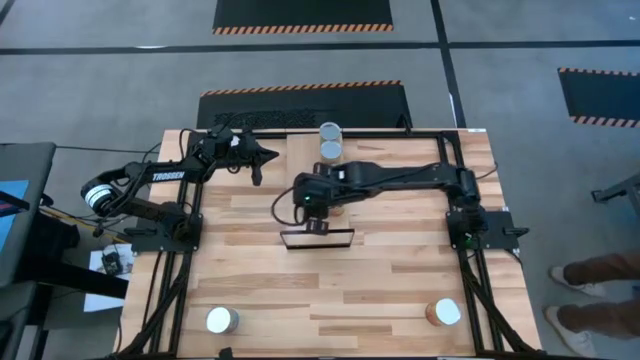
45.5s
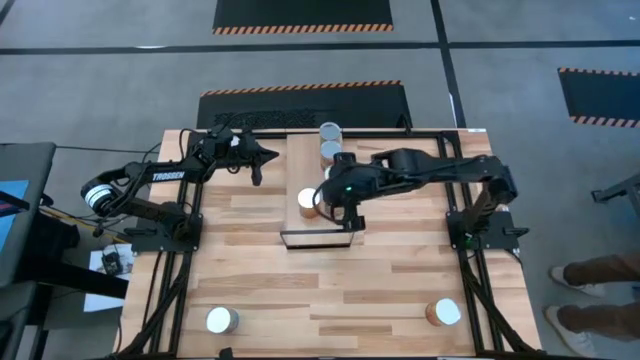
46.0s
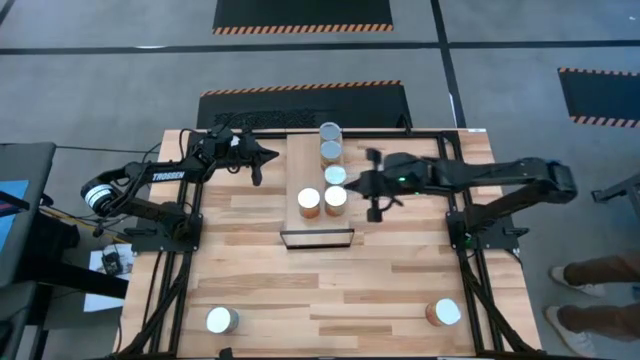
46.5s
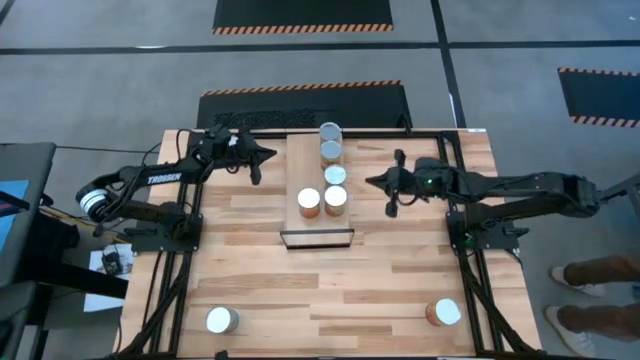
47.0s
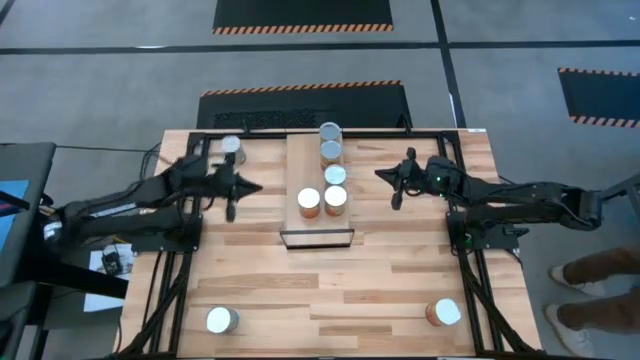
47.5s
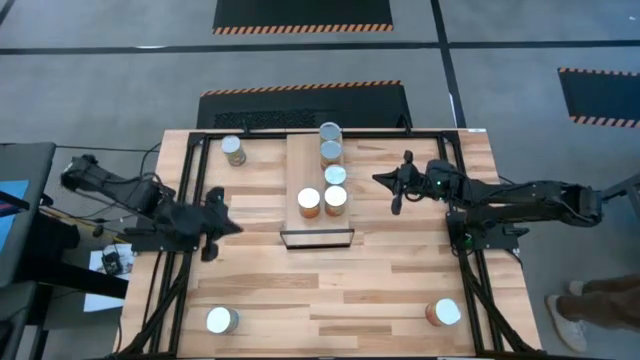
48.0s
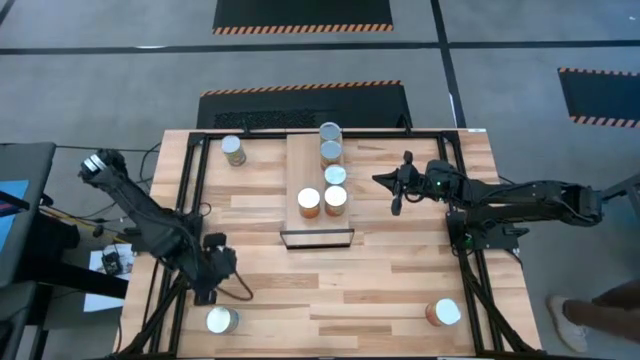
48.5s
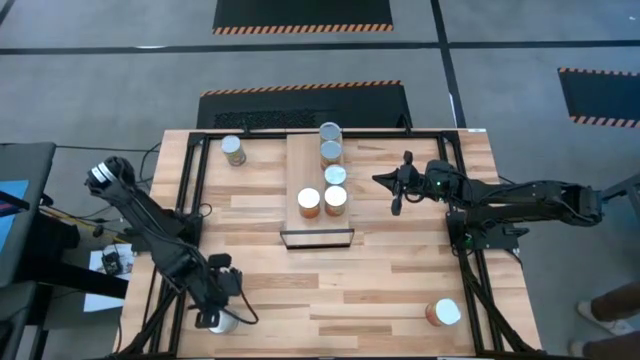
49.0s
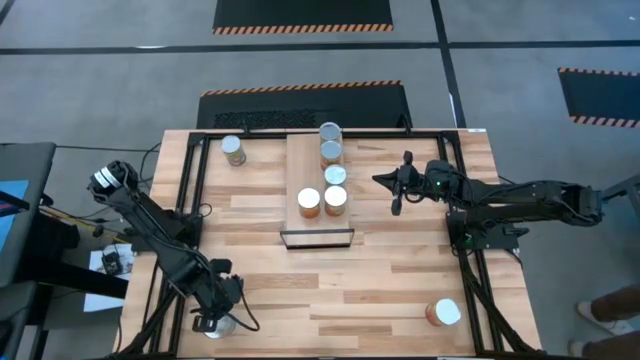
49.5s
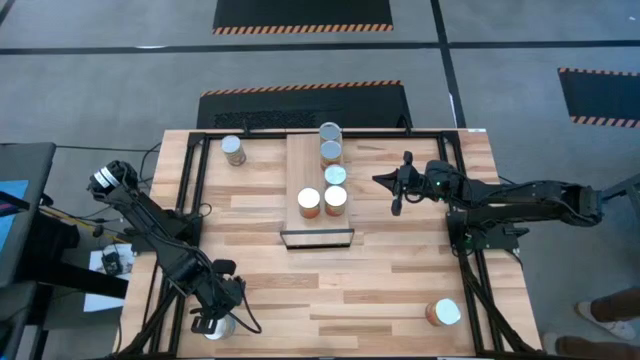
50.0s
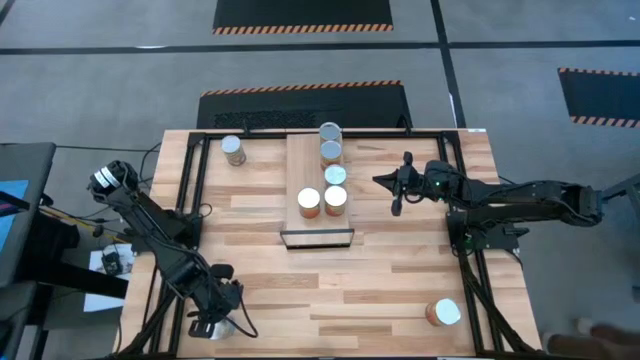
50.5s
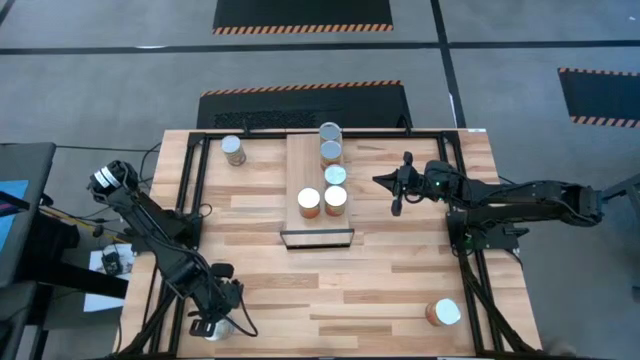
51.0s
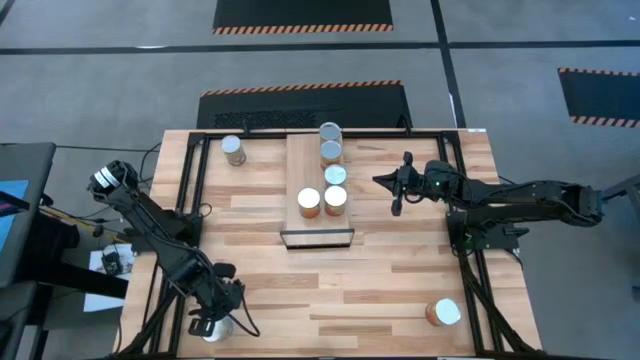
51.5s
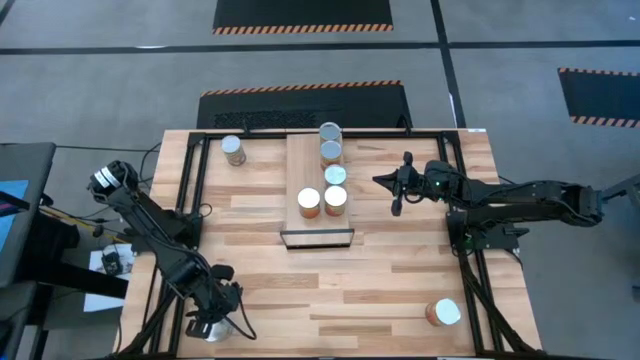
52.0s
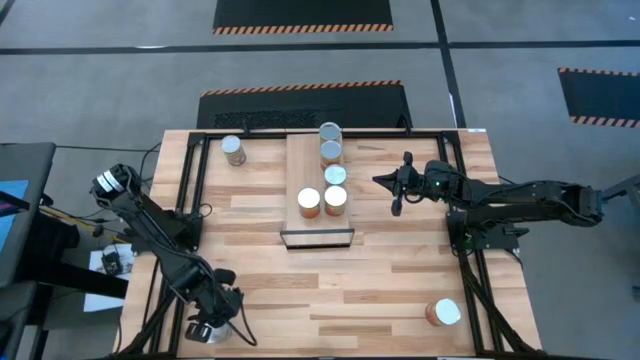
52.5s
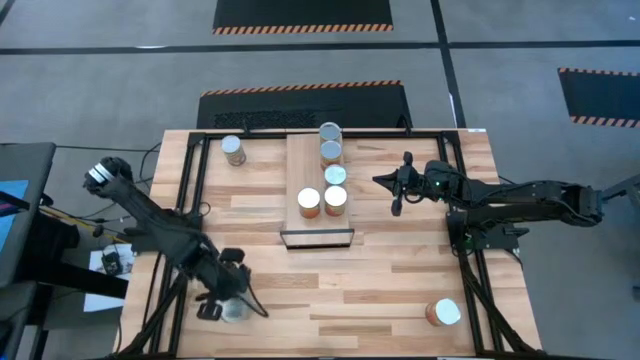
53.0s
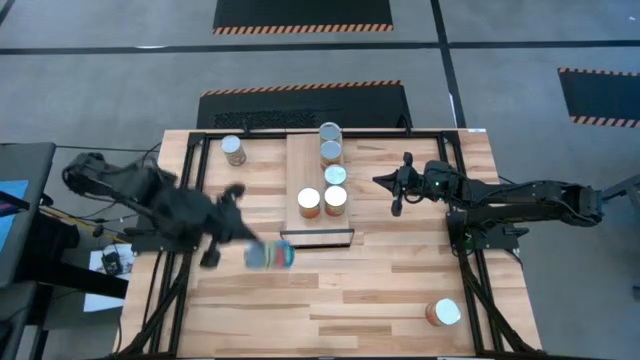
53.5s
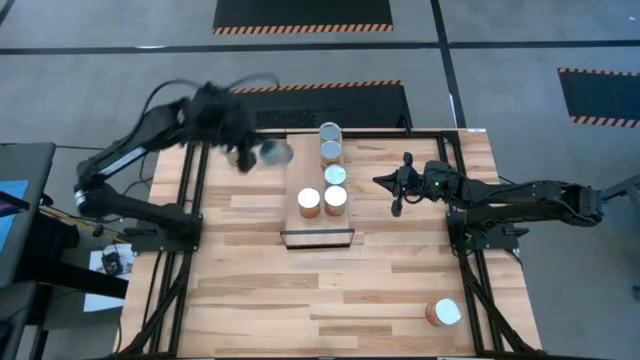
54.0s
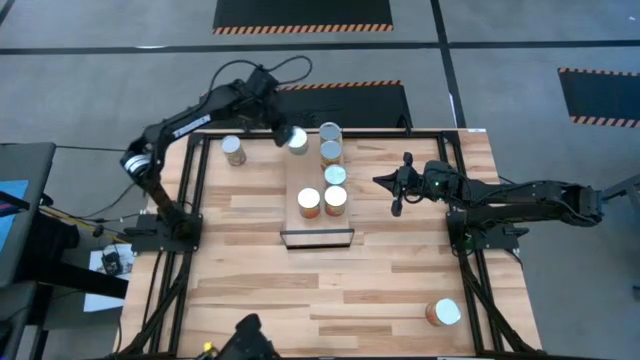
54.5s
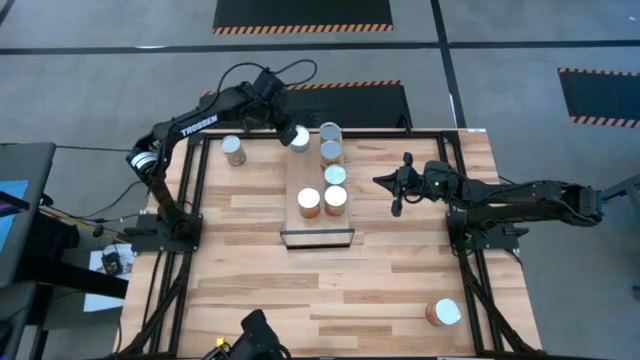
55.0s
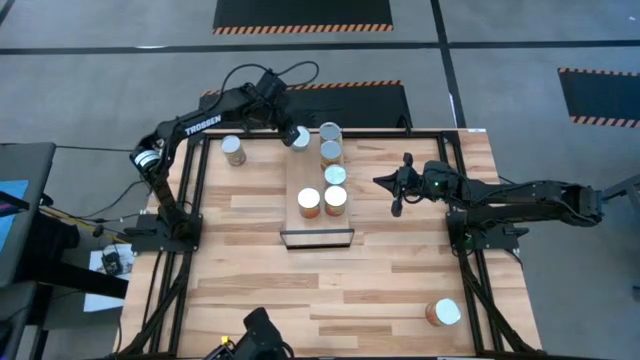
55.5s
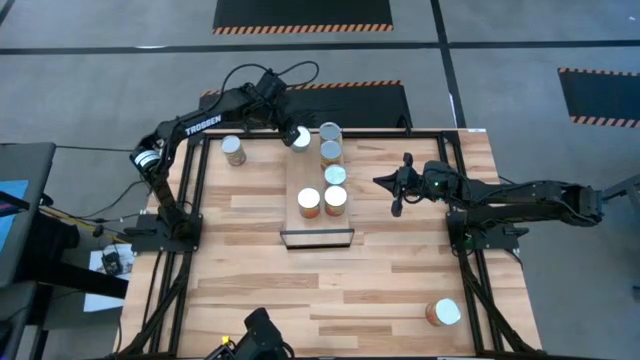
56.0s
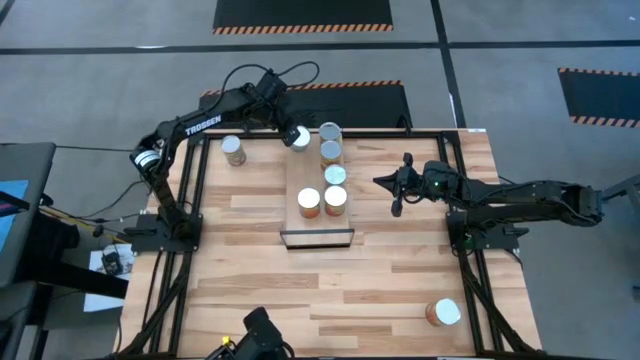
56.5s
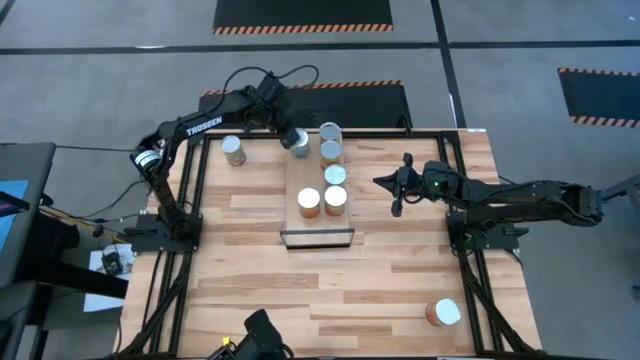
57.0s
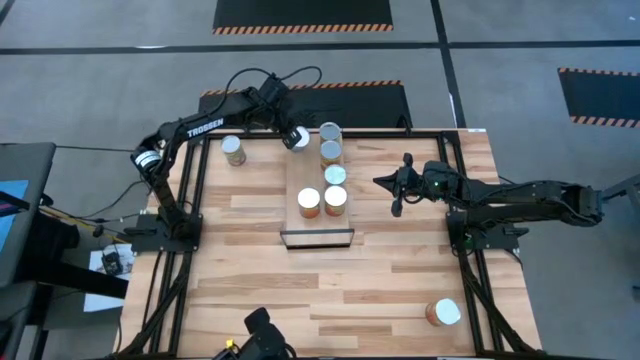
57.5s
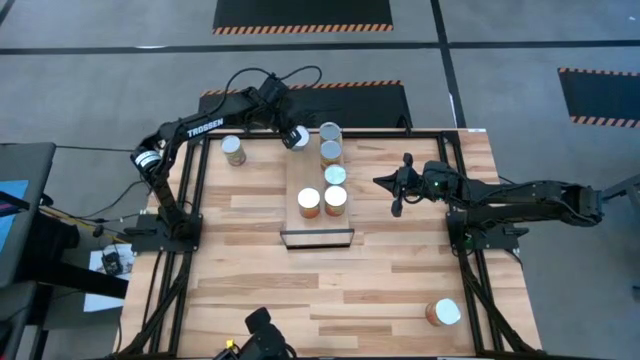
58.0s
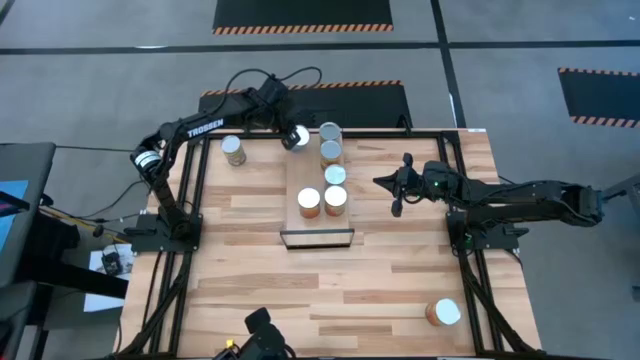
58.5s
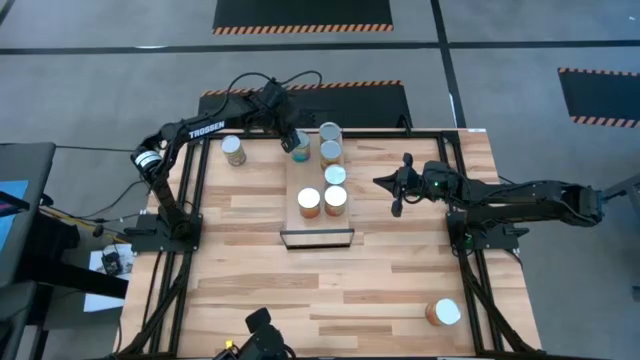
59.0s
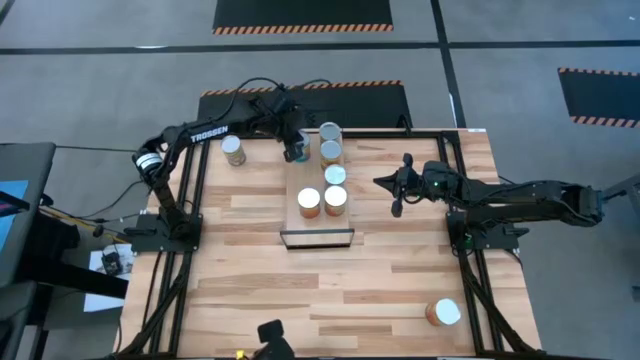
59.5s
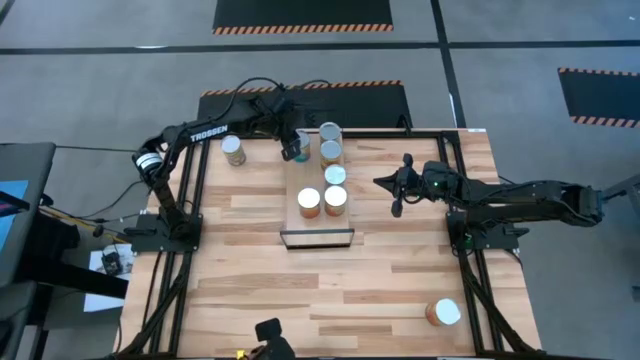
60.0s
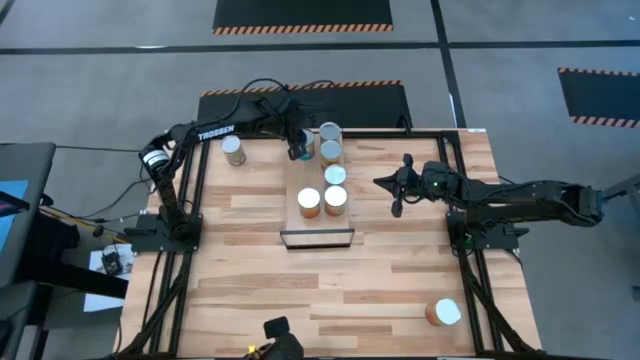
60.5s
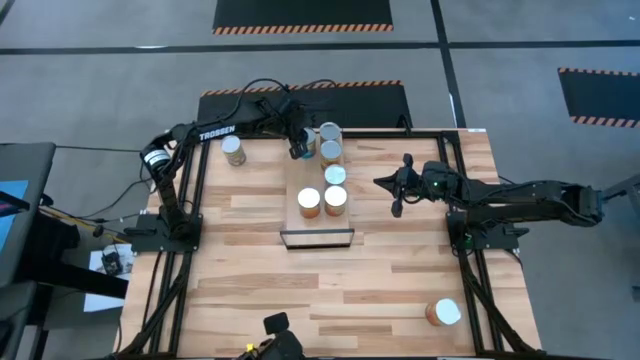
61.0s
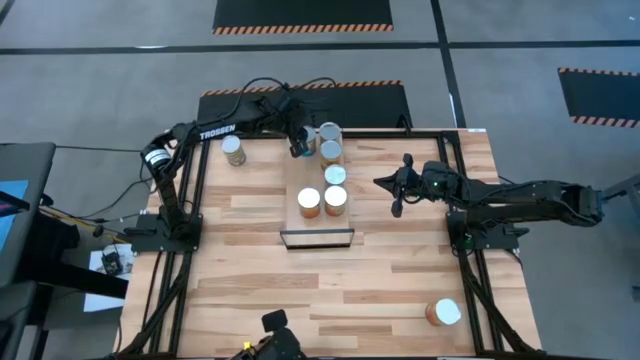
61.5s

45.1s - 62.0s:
Task: Pick and place cans onto a shelf
Align the canned tomatoes with the other canned tomatoes on the shelf

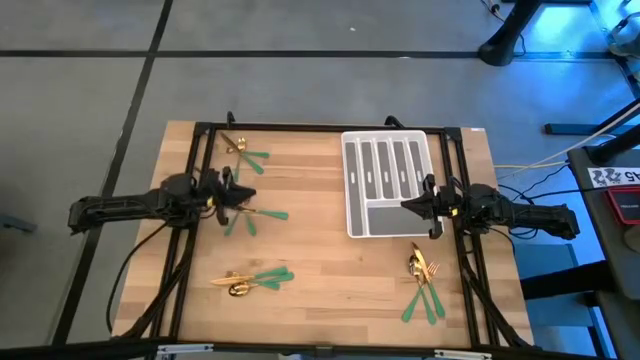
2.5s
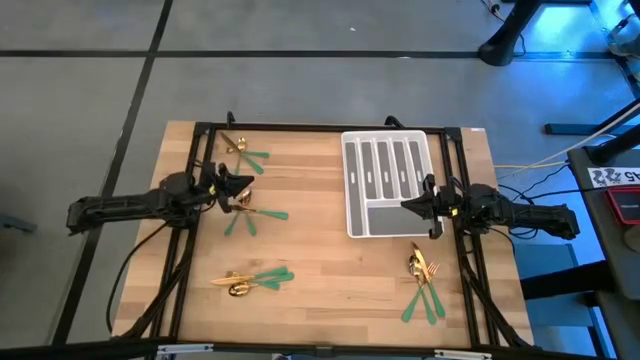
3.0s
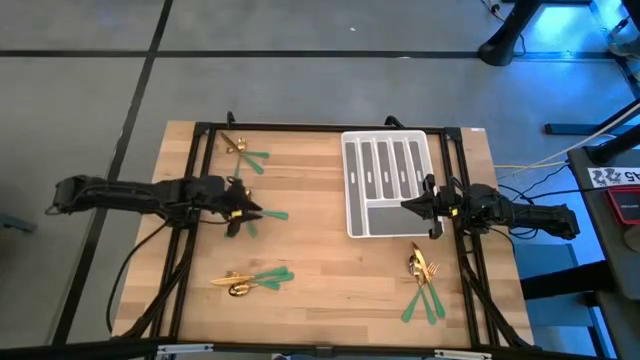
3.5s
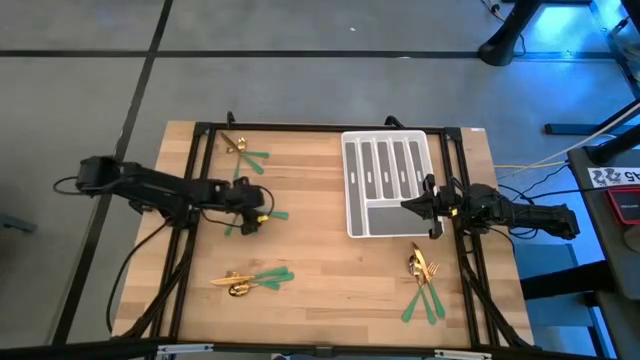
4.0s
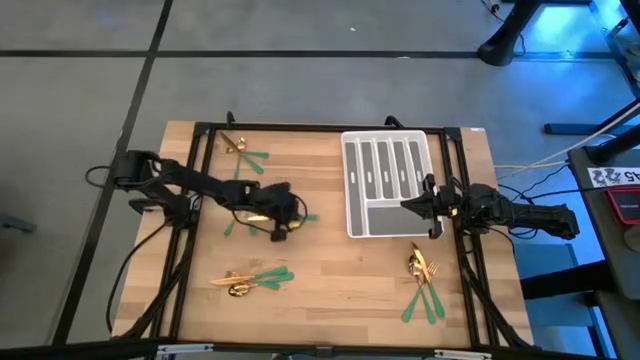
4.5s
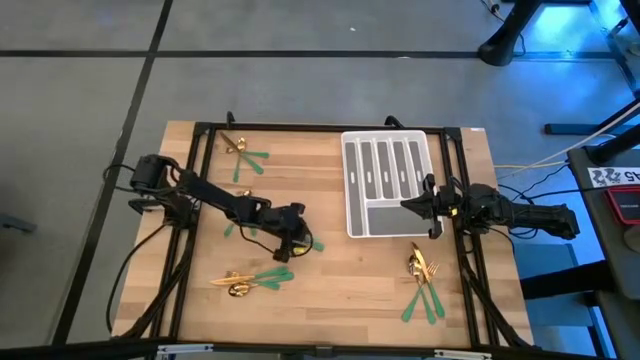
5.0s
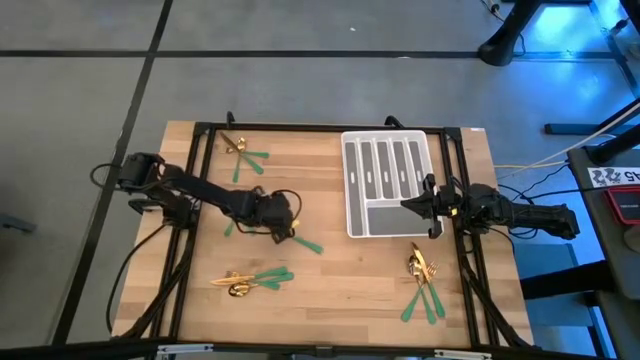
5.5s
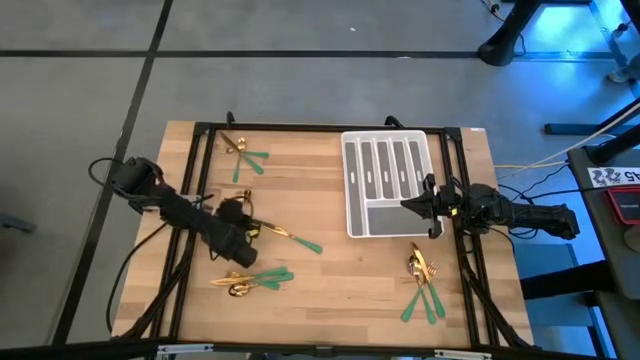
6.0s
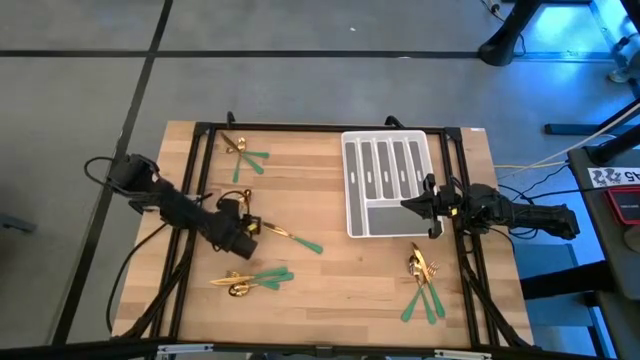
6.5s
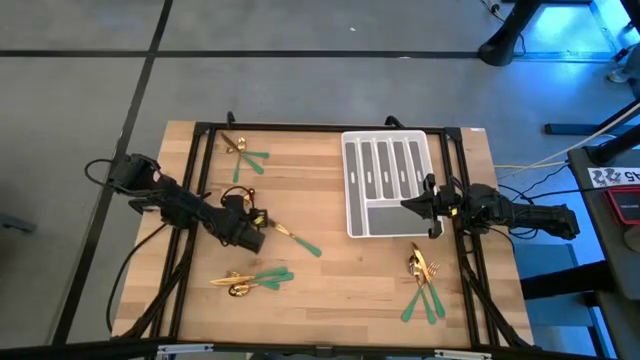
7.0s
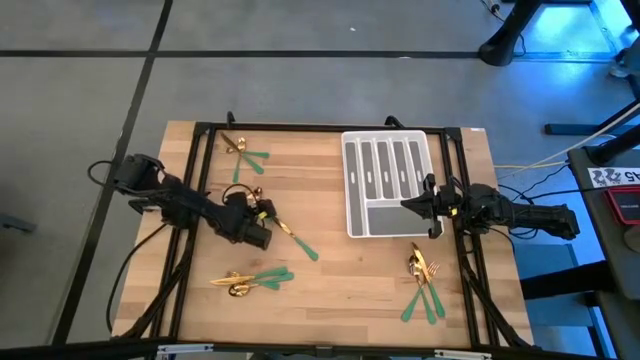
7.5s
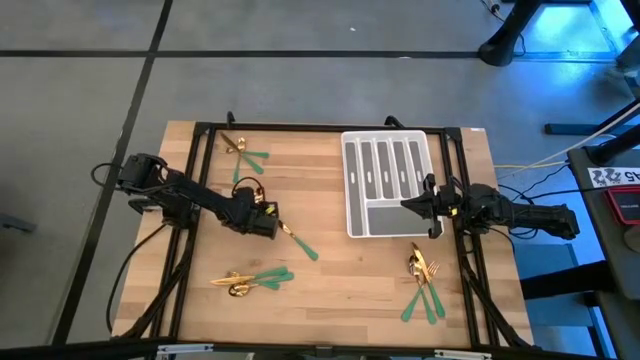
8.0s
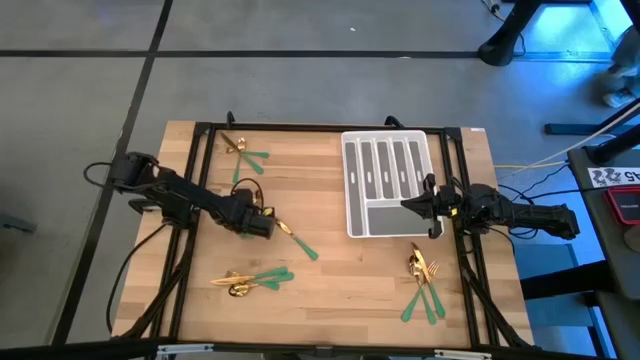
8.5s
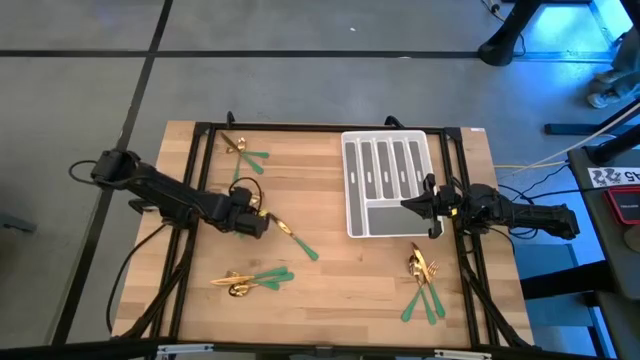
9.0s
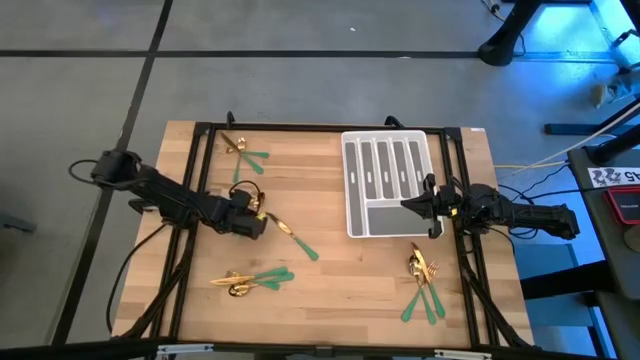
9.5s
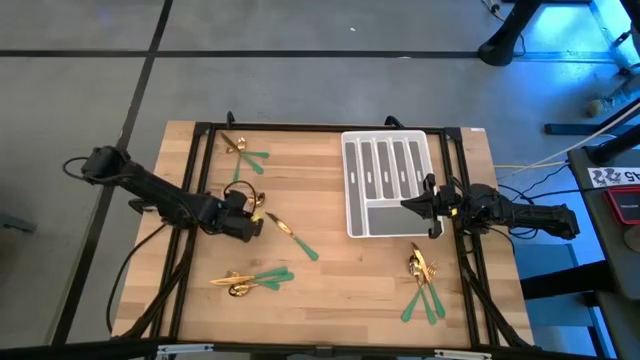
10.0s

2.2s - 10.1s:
Task: Sort silverware
Put the green fork into the silverware tray
